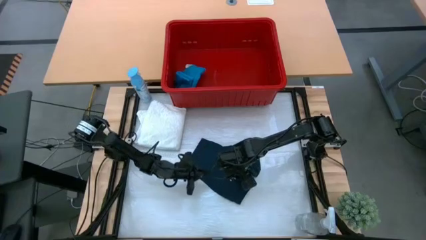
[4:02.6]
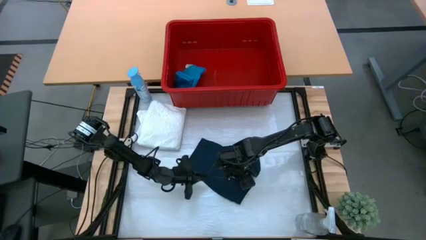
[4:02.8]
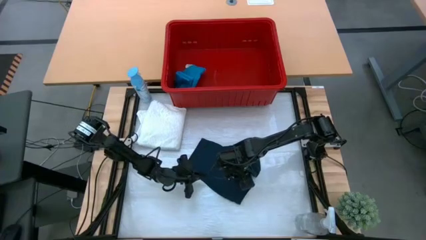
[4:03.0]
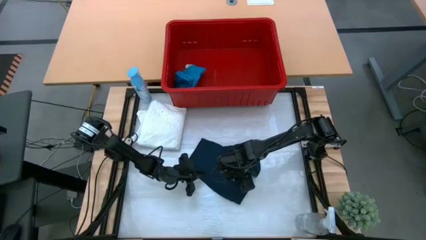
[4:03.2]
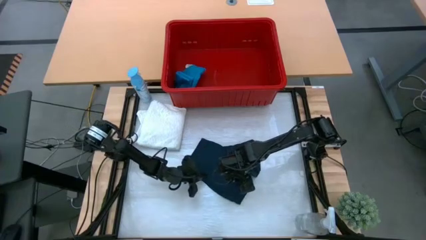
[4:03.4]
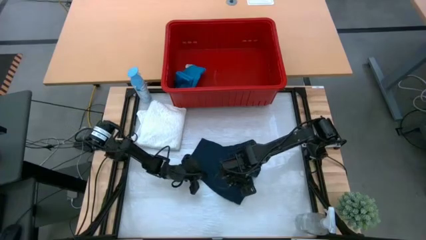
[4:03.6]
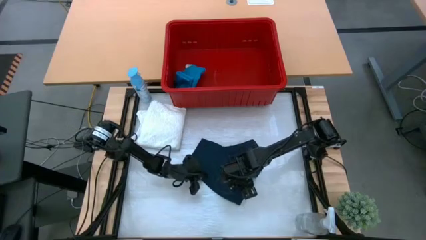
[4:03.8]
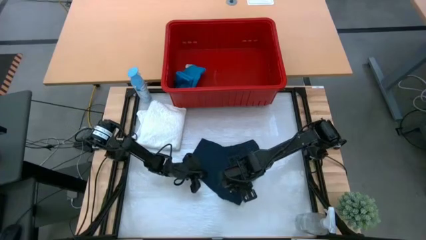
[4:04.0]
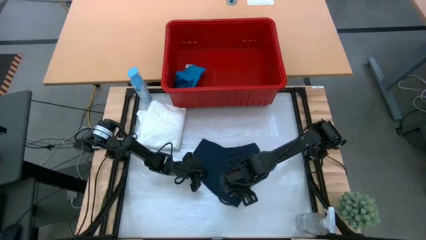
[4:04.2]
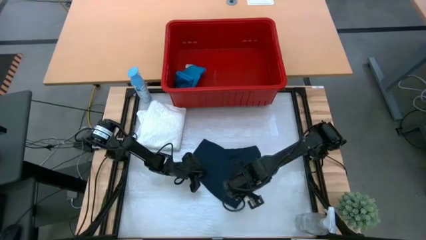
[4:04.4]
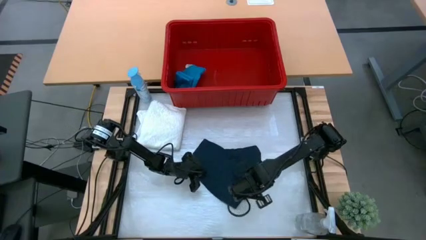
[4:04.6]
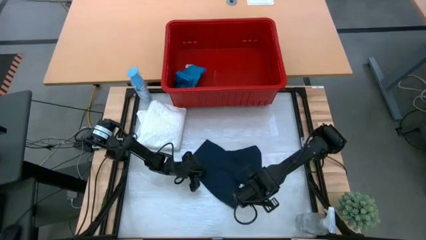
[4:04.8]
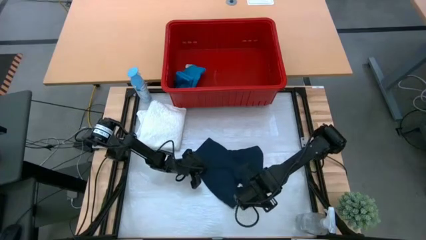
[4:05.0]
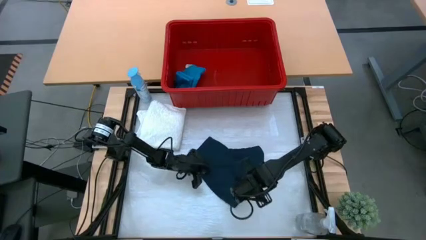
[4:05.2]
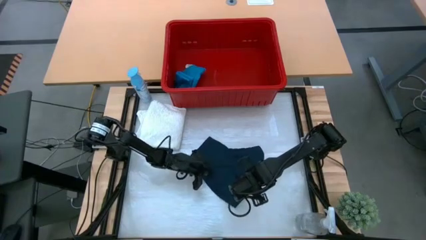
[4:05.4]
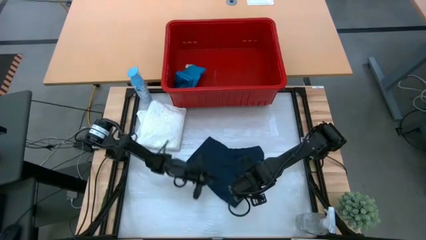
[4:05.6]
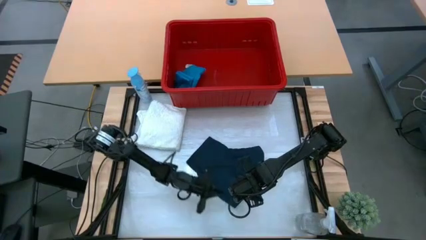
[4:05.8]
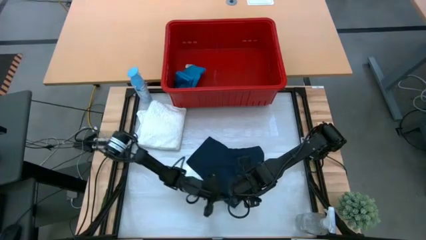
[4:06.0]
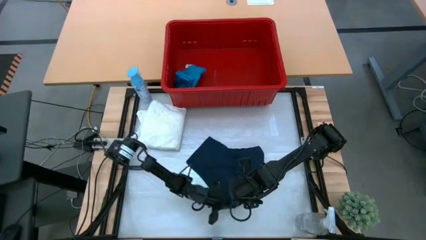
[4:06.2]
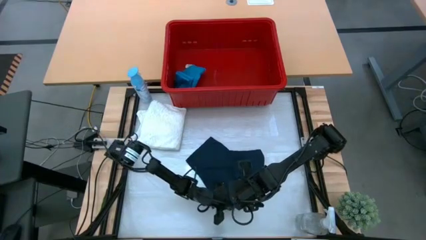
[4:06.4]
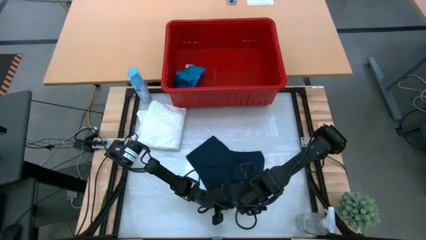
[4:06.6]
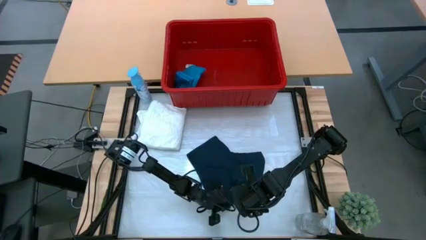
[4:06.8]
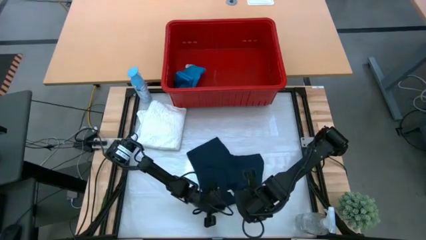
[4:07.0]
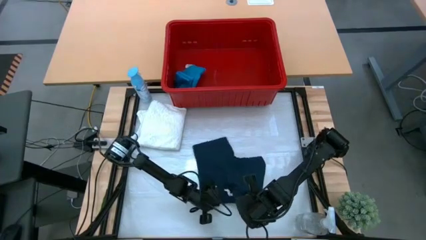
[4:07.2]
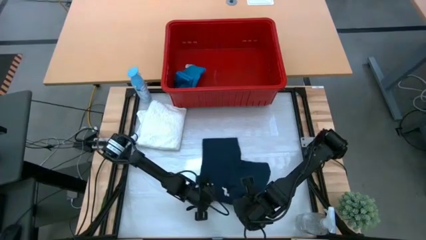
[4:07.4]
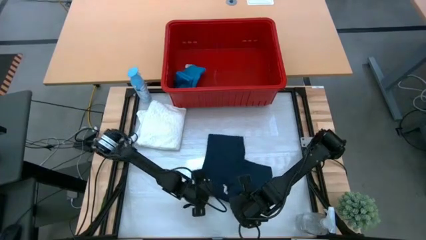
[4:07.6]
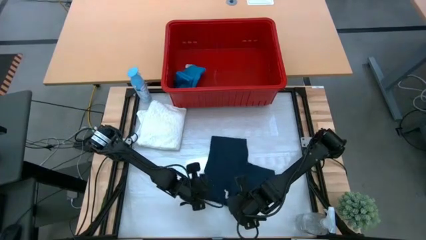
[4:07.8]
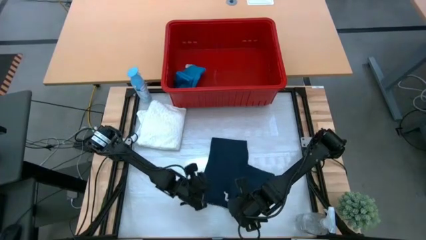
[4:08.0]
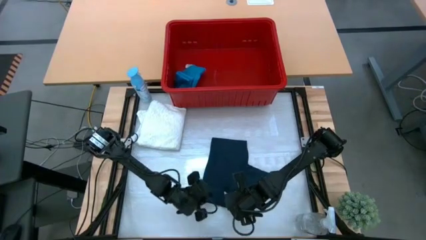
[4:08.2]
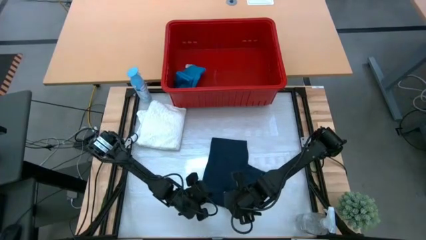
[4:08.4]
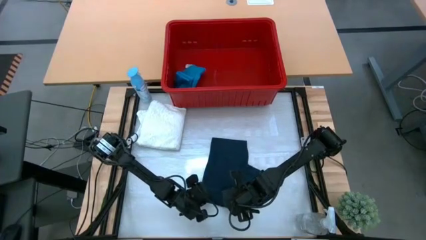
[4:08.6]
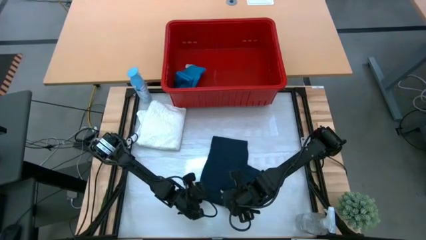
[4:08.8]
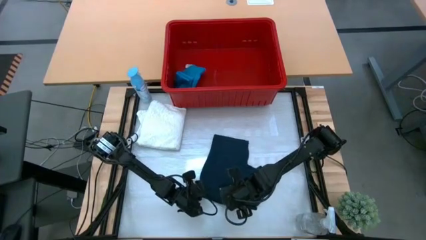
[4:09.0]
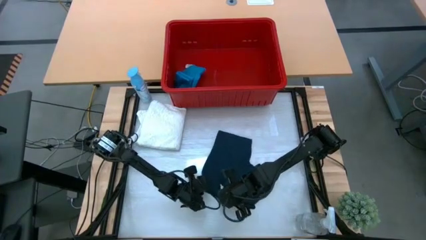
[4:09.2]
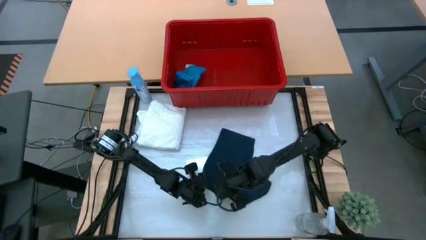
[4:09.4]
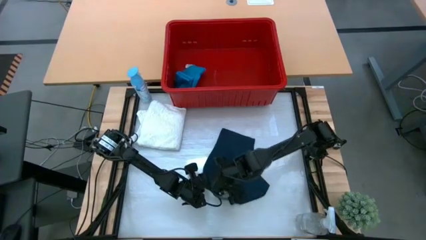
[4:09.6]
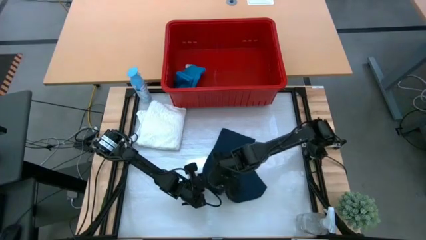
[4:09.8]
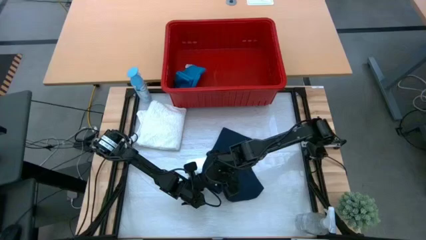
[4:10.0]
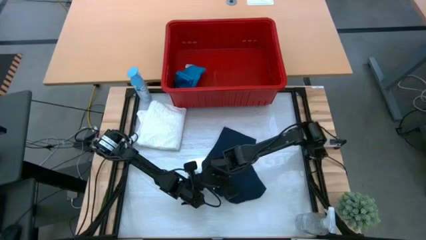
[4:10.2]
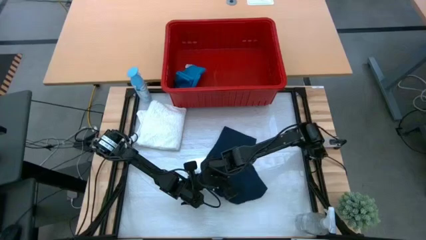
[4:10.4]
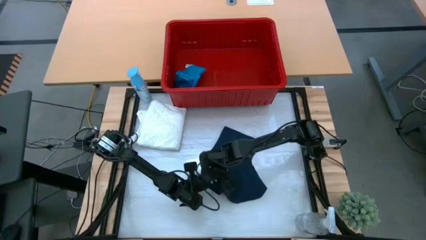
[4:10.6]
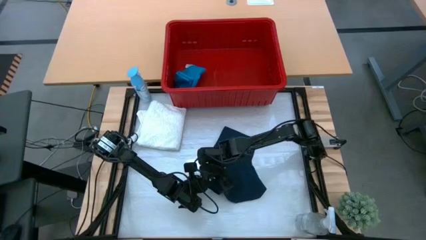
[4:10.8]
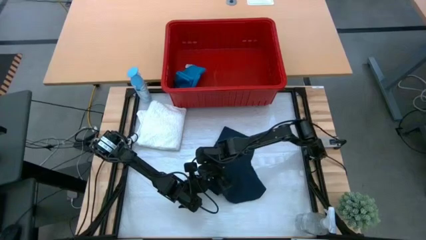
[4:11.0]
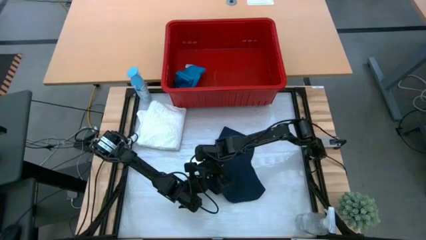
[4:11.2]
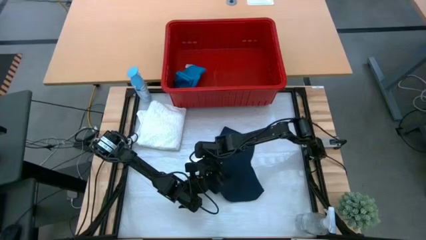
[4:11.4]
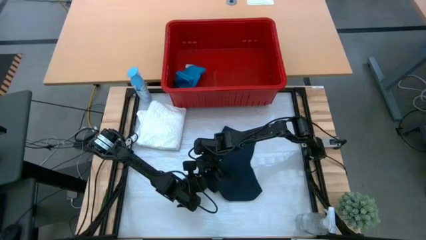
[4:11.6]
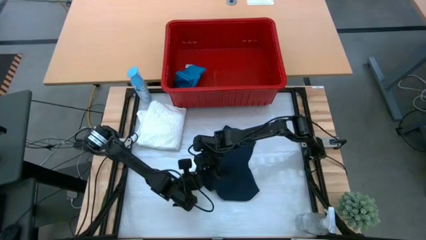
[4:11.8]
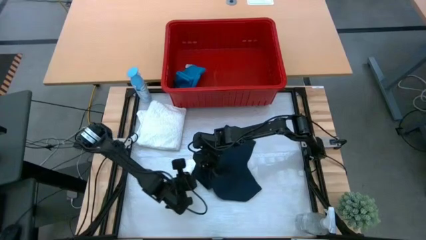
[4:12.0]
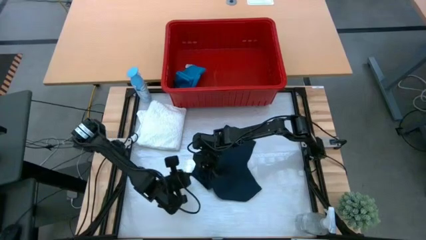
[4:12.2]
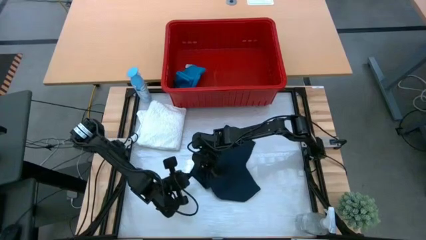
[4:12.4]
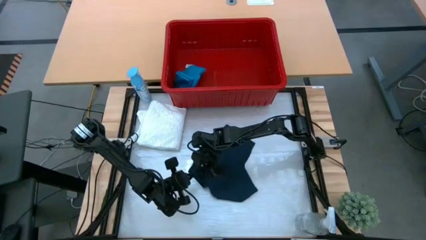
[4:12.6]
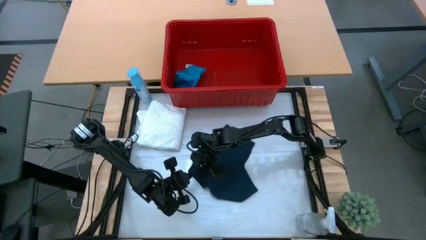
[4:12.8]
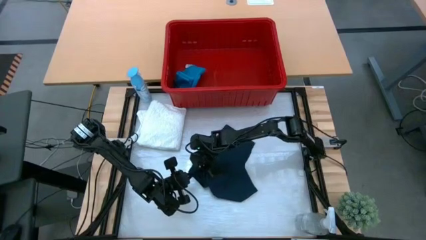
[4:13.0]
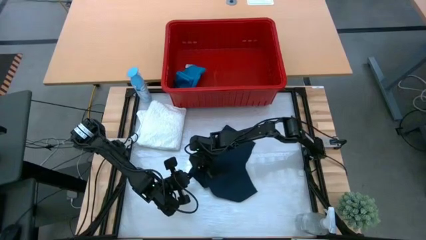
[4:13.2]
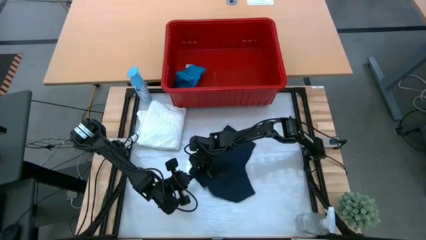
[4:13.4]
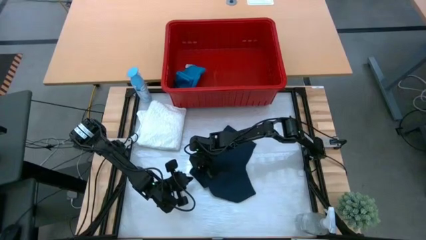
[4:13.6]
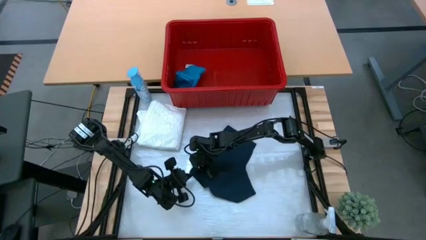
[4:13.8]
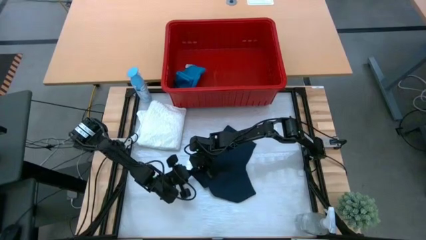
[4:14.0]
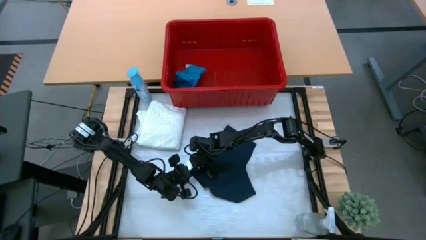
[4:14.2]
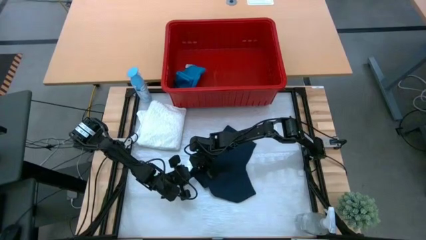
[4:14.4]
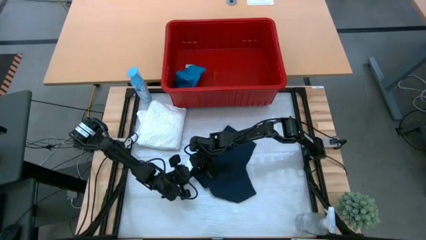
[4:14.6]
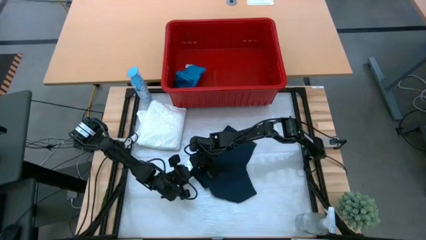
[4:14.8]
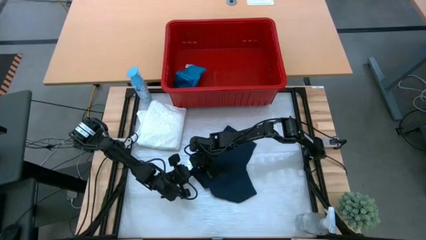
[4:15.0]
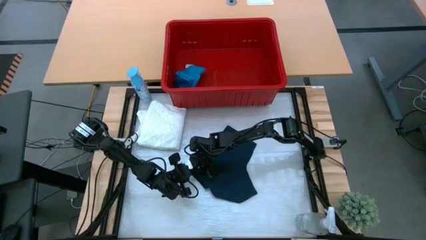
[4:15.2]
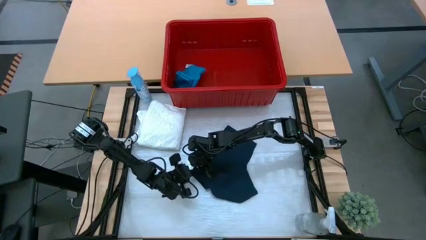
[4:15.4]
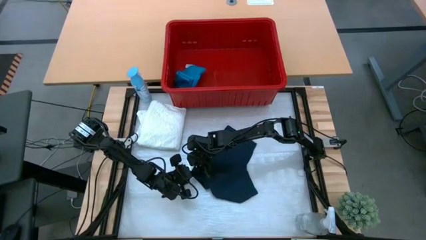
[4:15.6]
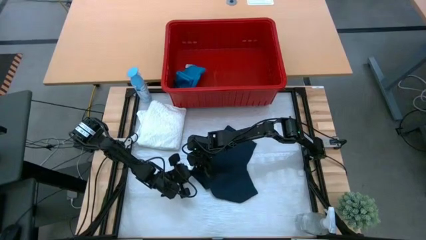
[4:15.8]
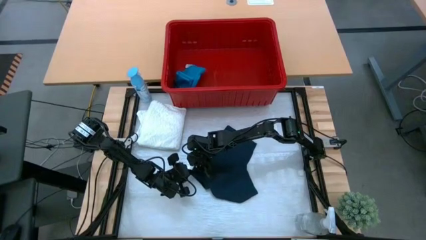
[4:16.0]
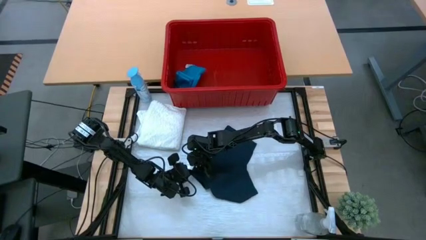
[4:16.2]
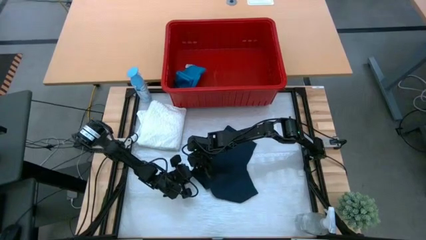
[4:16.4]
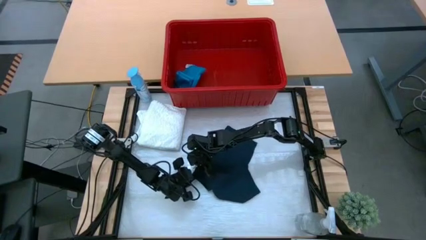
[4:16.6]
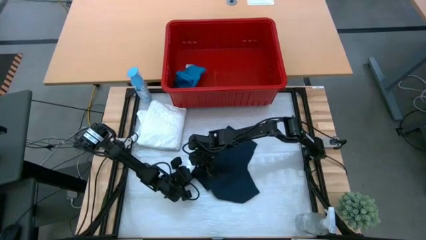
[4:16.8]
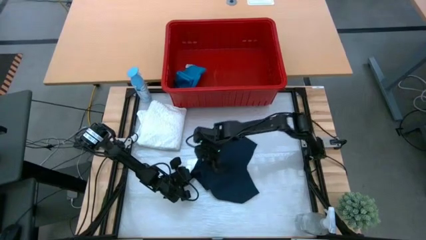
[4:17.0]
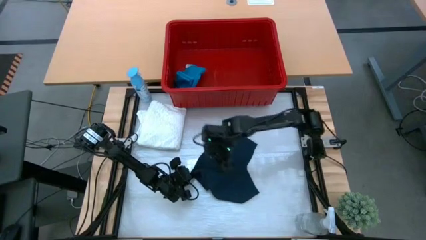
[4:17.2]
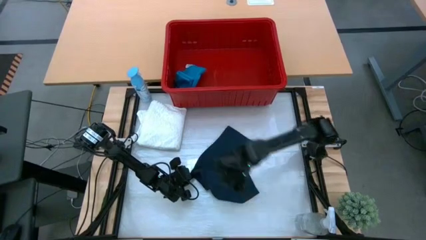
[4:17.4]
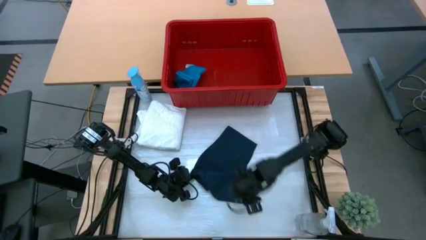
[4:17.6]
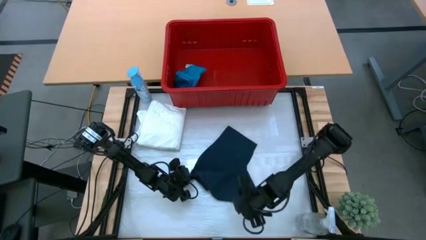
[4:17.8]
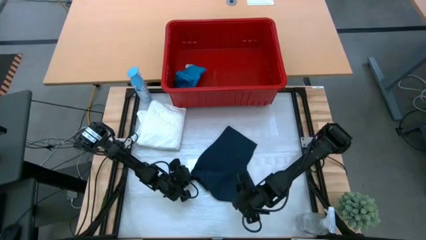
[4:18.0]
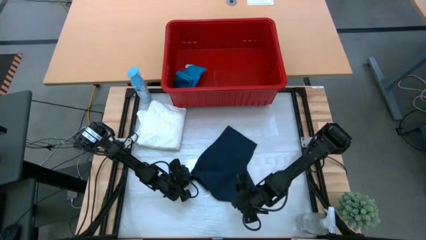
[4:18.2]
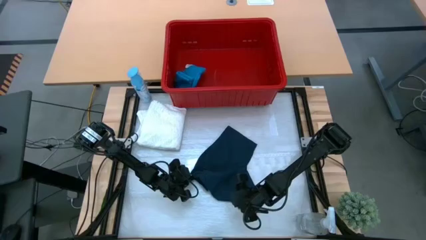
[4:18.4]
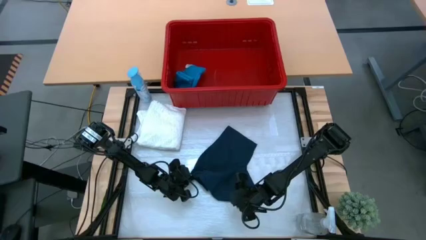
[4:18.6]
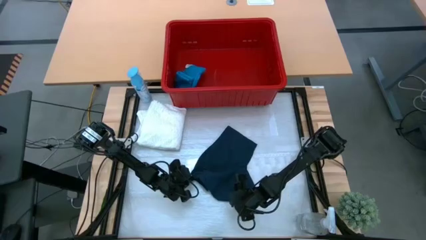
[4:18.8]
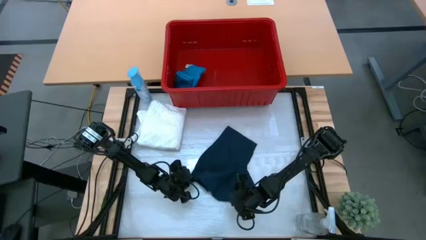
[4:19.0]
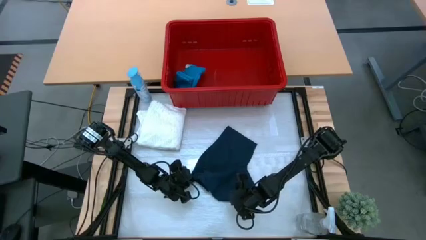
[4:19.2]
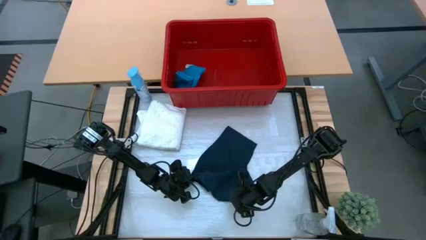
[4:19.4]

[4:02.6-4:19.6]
Task: Fold Laundry from Bin
Fold the black shorts
